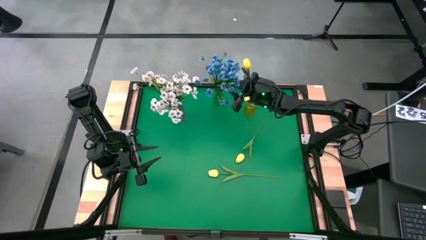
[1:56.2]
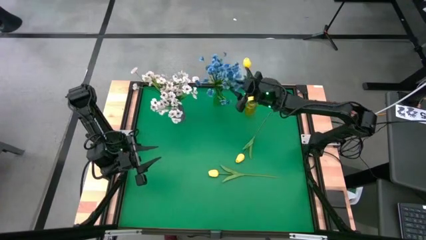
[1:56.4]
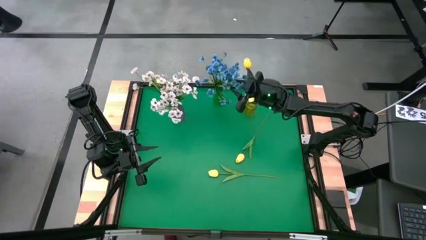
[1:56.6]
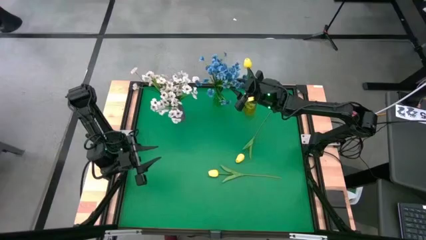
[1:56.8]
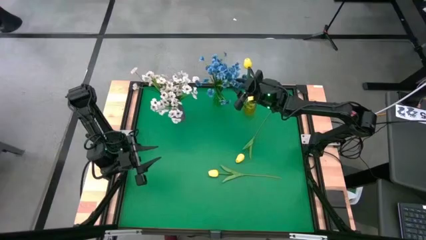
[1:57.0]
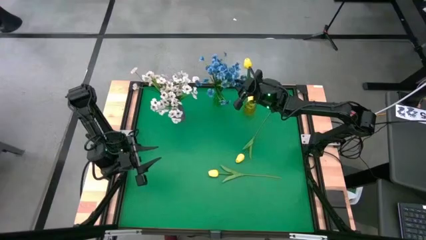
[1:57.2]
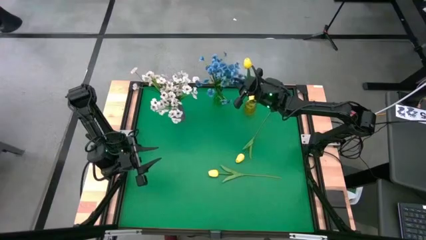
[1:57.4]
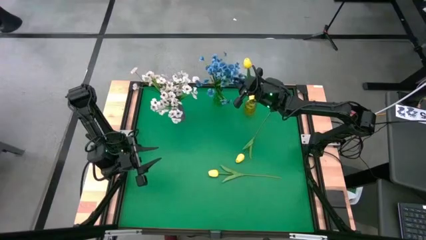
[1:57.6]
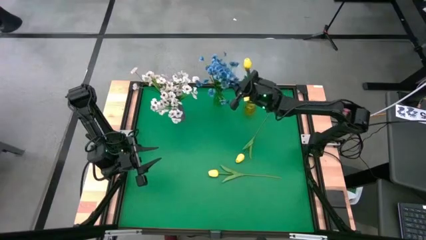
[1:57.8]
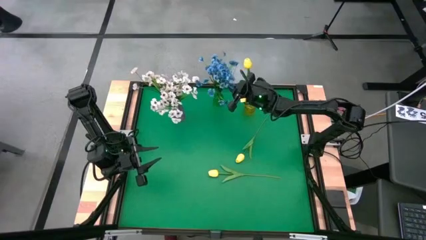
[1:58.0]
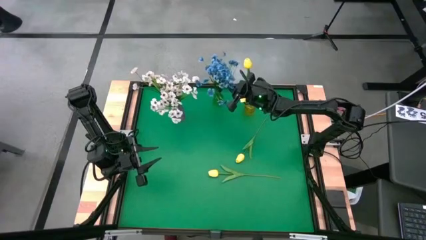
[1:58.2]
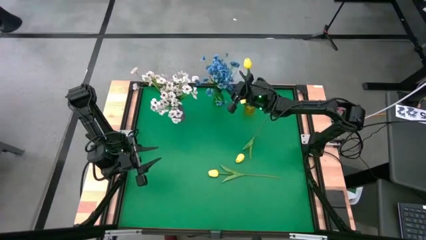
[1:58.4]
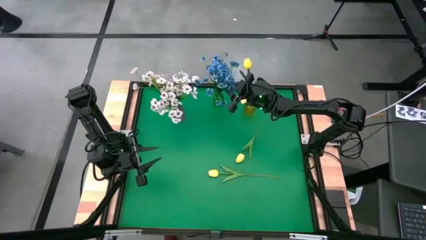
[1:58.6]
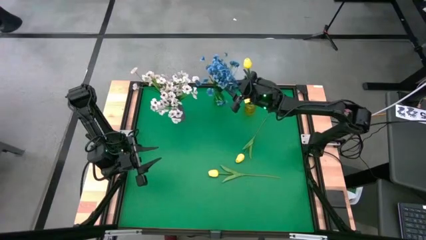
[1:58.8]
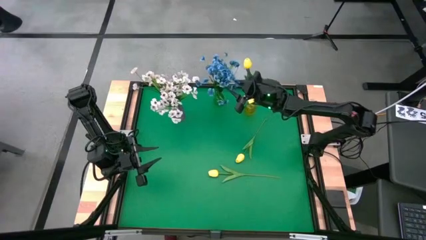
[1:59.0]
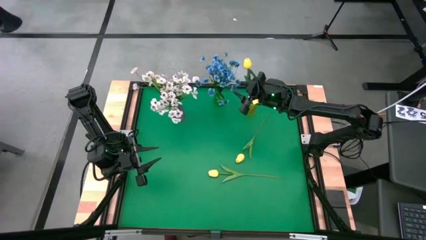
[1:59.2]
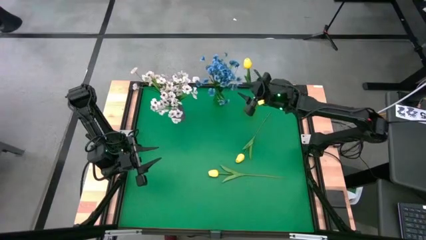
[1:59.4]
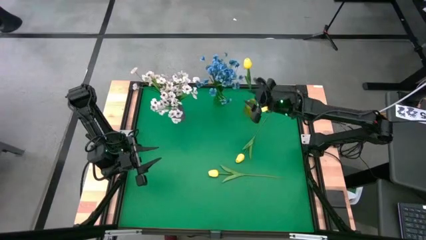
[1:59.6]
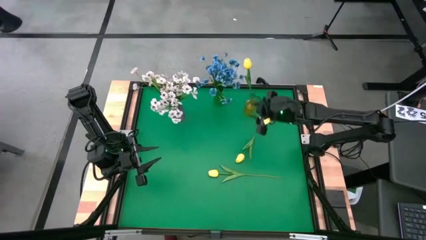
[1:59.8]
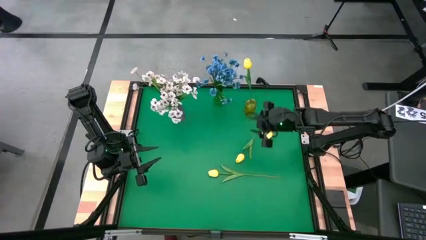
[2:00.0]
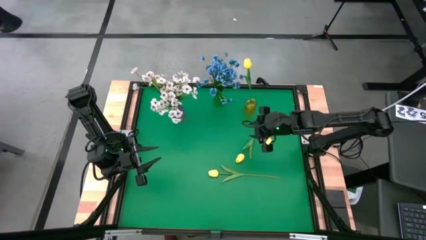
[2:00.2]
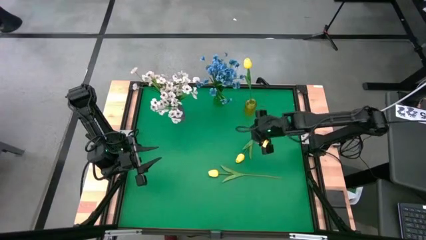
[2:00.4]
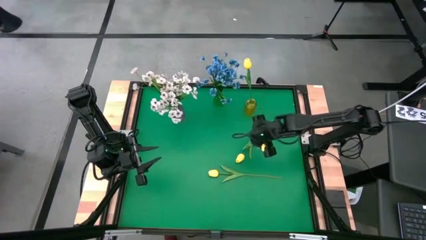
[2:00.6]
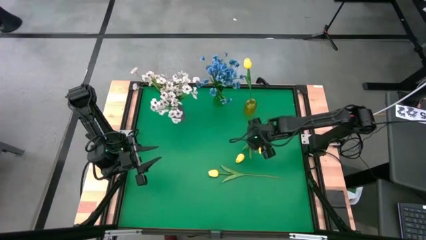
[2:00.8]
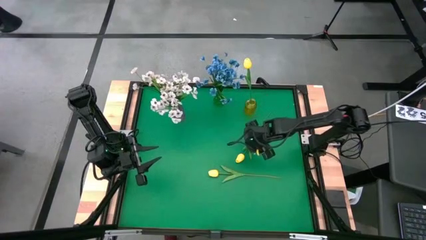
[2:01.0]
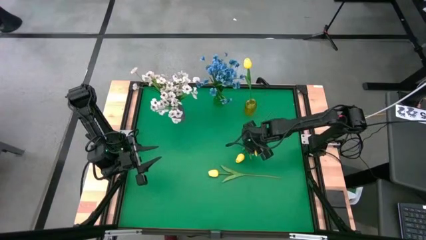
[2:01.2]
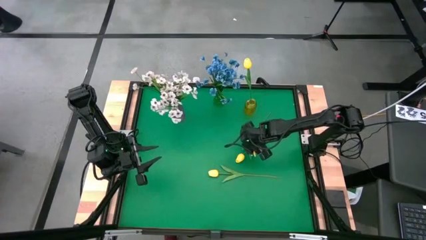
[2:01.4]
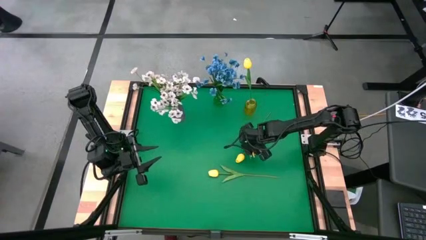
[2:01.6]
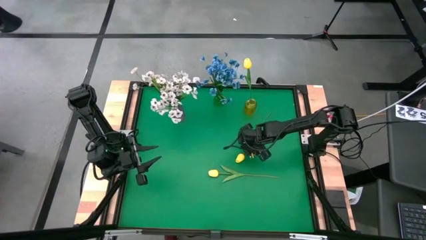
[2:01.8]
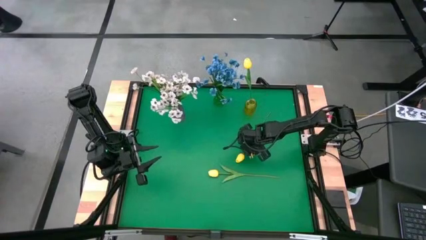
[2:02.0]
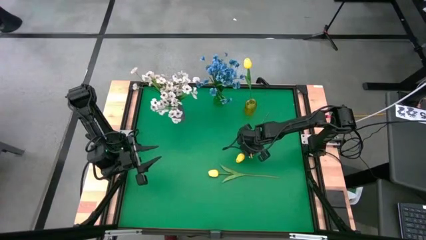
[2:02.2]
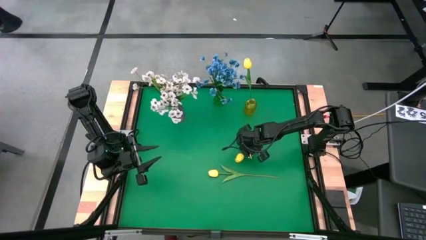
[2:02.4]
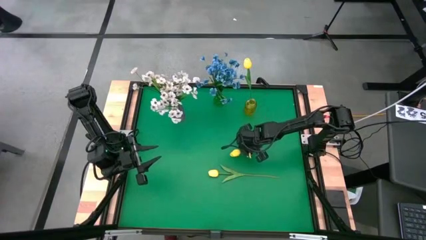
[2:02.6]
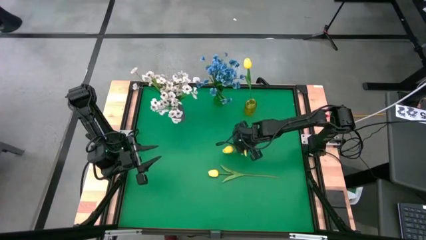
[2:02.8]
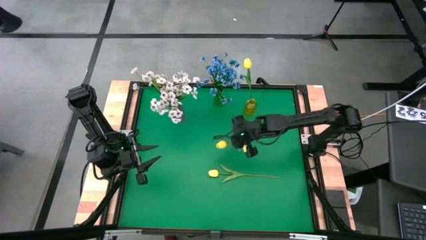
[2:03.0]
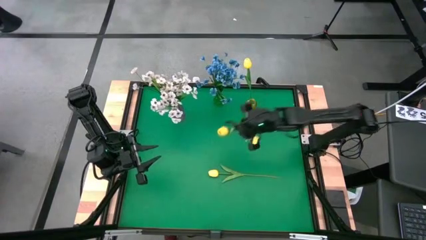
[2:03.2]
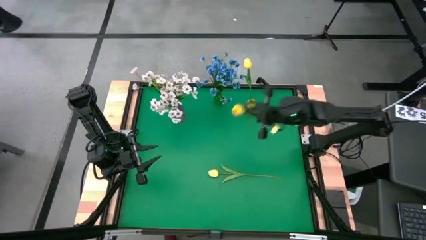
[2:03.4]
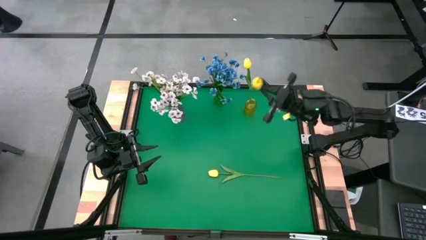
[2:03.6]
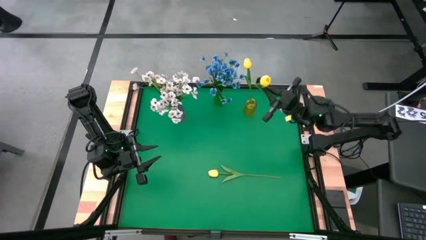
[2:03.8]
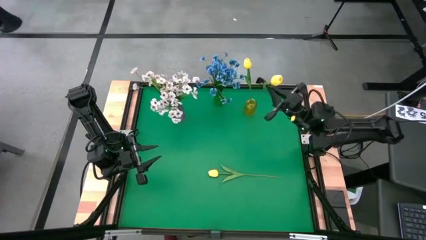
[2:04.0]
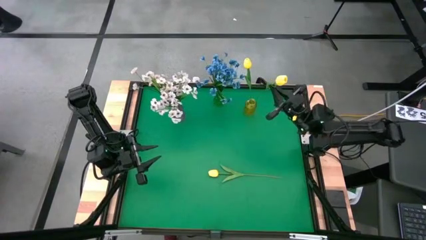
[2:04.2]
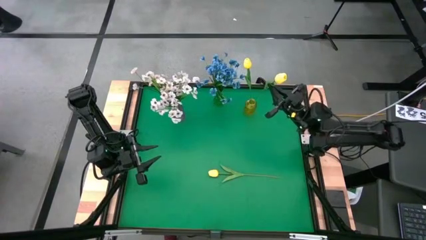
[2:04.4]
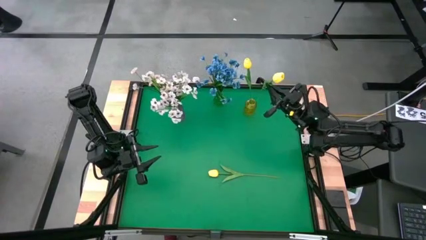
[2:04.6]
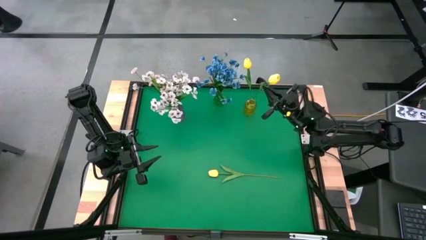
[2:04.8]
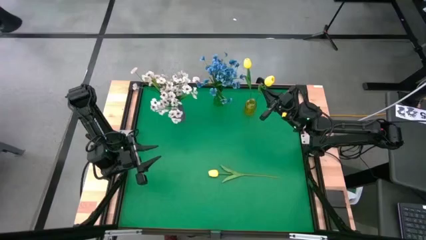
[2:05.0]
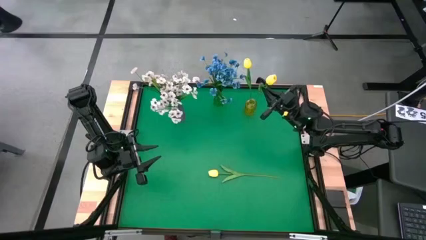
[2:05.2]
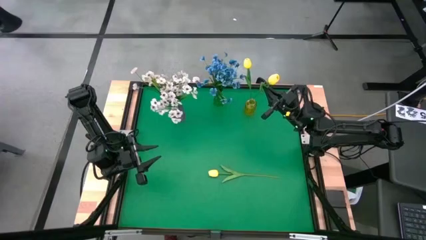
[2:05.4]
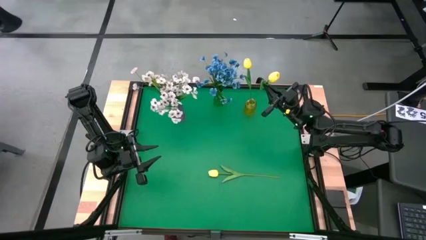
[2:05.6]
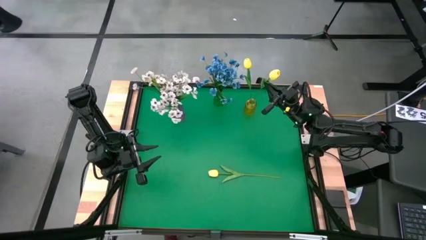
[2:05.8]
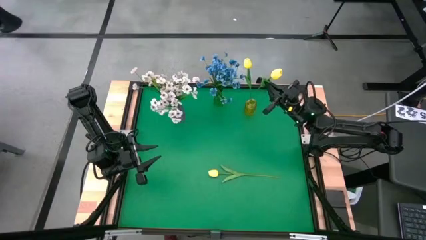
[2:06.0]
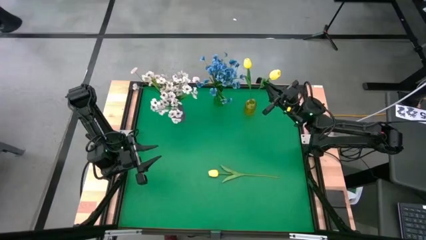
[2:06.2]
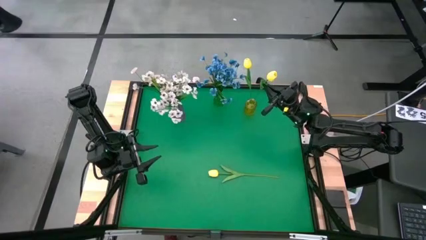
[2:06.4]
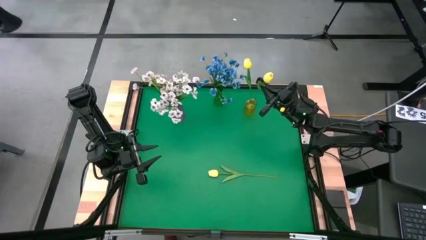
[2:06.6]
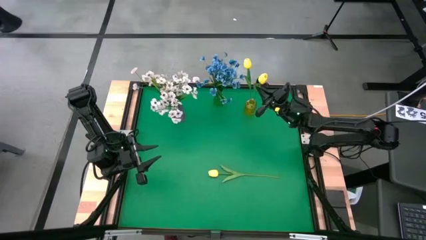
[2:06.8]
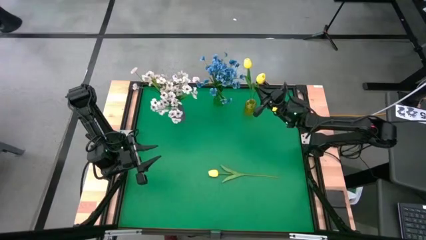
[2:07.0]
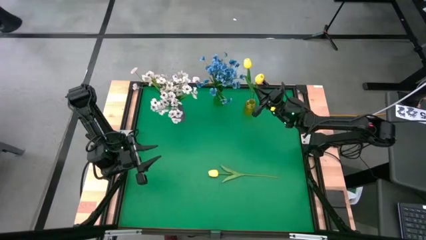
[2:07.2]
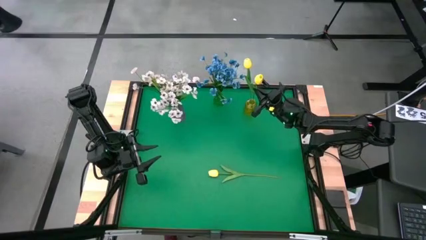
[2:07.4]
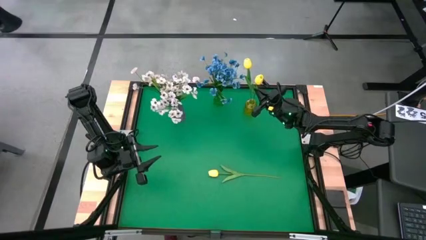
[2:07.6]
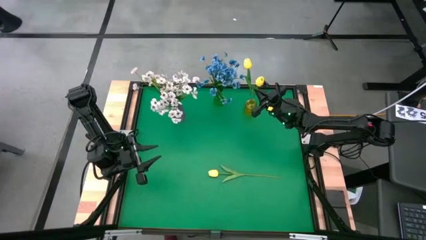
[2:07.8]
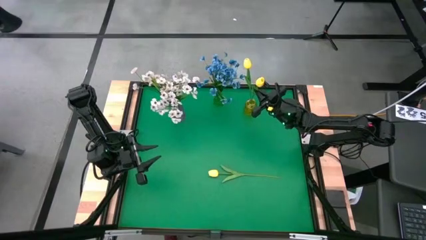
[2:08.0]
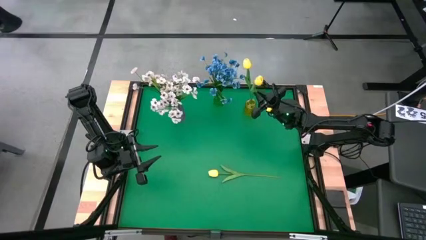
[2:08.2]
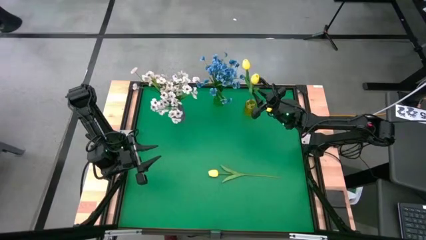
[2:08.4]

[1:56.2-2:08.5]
Task: Sort flowers into vase by color
Put the top yellow flower into the yellow vase

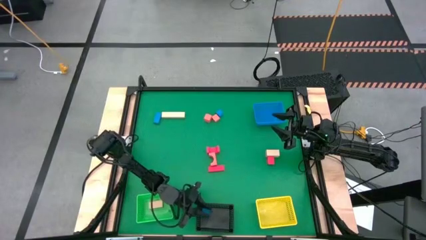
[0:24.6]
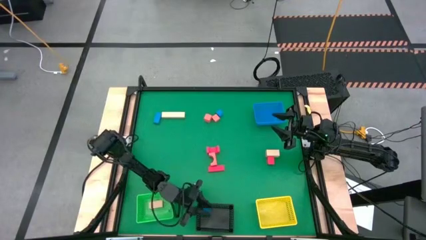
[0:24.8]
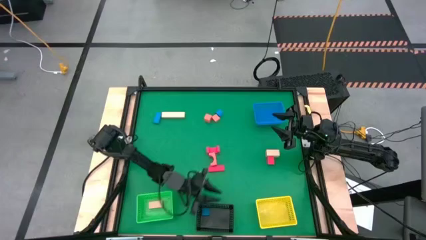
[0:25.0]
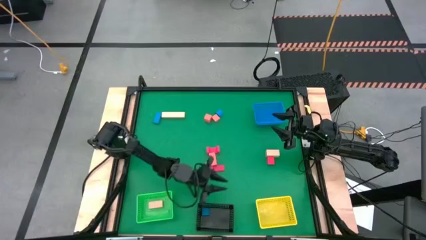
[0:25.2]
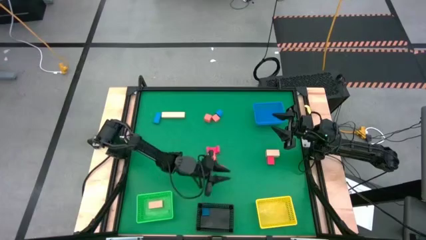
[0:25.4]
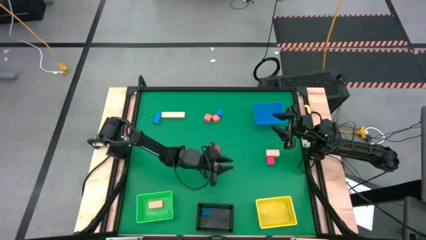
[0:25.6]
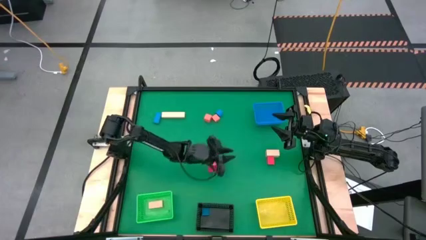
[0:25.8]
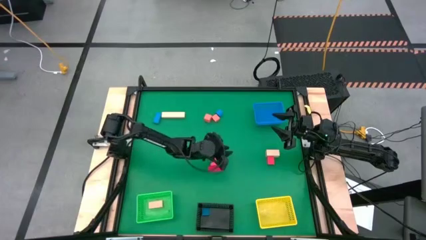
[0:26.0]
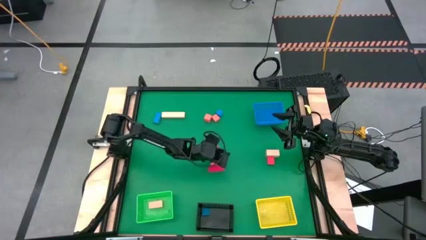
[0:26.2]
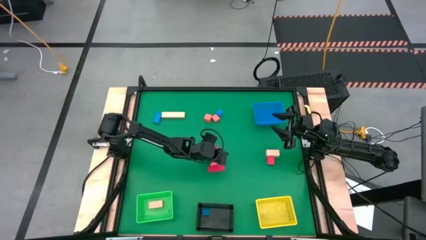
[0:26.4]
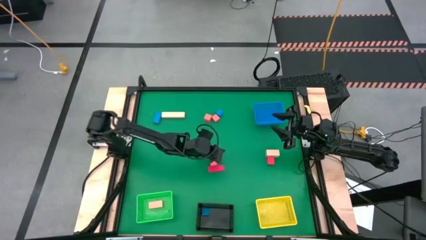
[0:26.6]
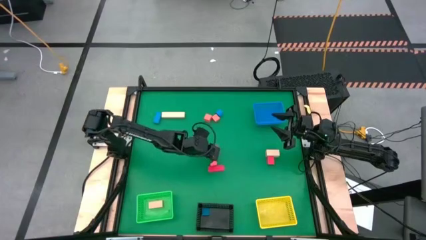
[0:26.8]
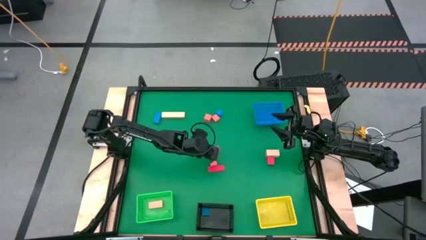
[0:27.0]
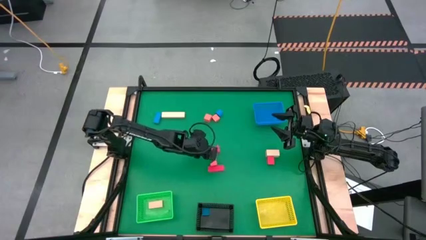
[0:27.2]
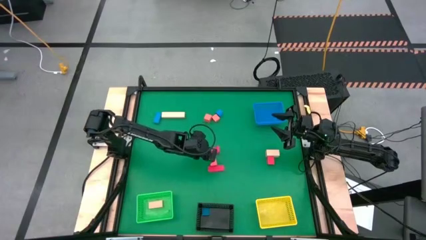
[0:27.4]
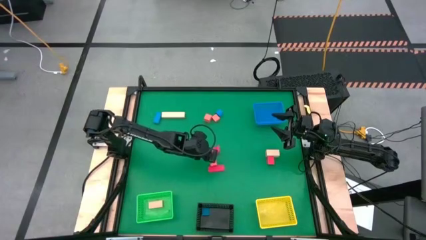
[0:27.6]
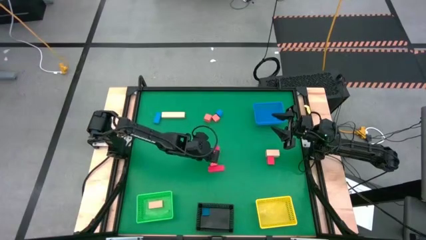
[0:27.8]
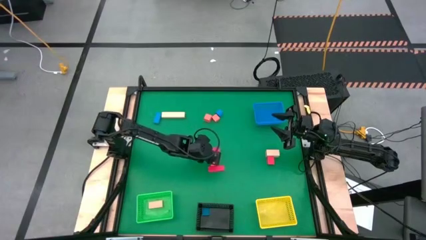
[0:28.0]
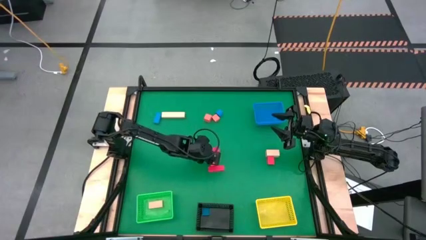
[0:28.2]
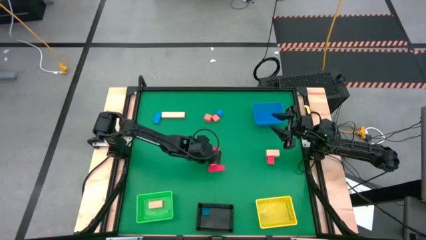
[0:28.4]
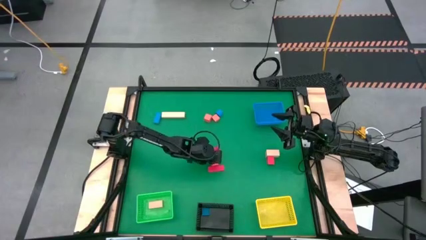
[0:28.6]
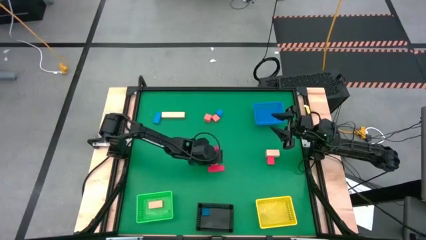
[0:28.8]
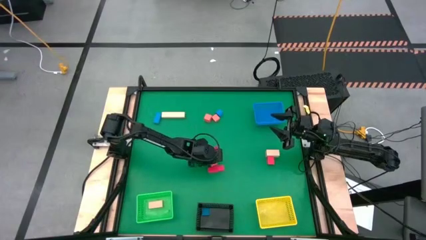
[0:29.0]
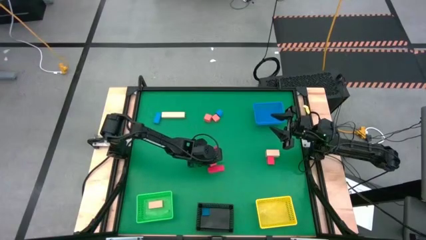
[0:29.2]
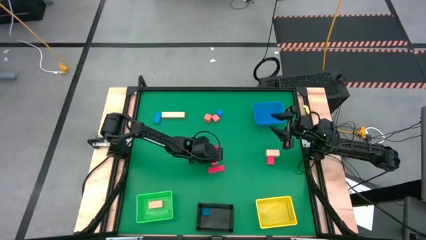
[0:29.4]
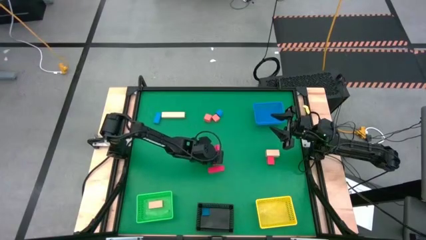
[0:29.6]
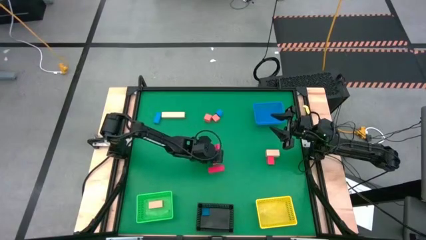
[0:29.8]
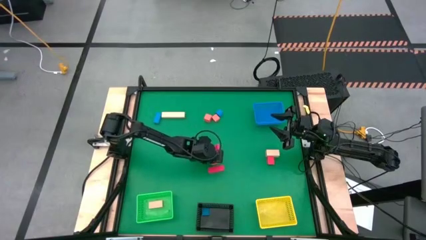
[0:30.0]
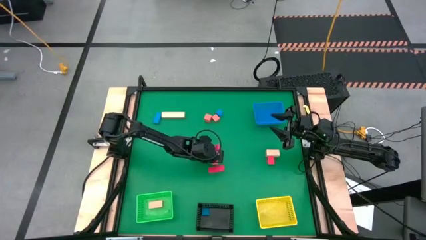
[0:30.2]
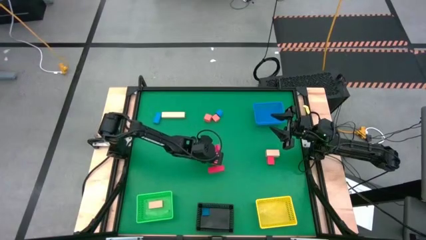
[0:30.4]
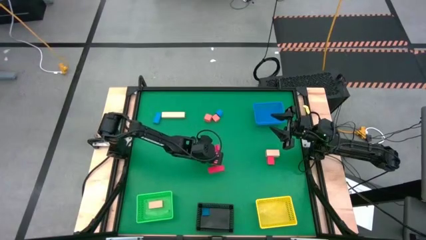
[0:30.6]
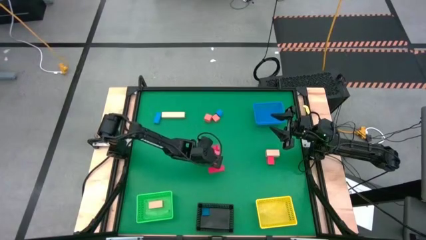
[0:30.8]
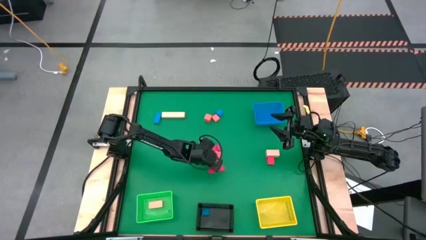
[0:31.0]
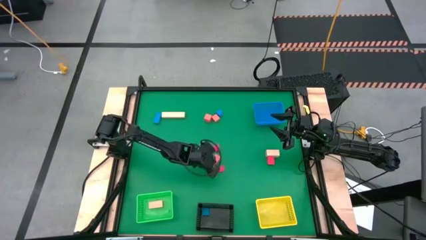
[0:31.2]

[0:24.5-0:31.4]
Task: Sort & place blocks by color
Put the orange block into the blue bin
